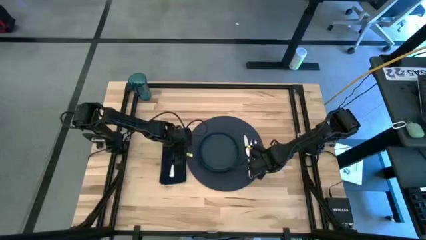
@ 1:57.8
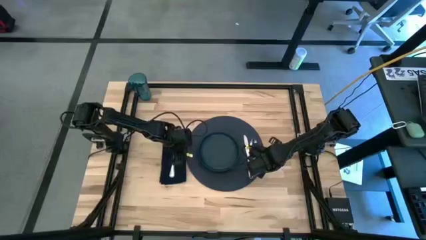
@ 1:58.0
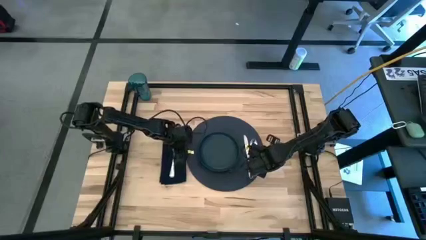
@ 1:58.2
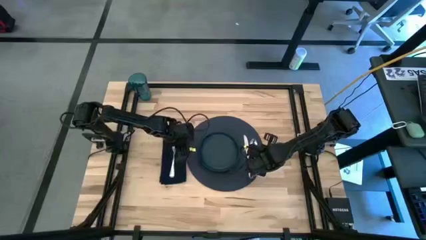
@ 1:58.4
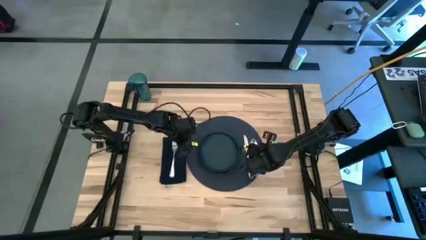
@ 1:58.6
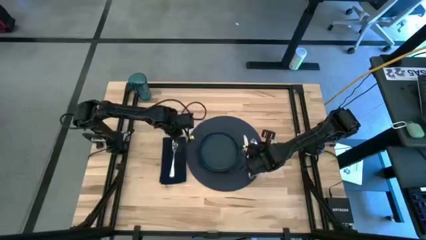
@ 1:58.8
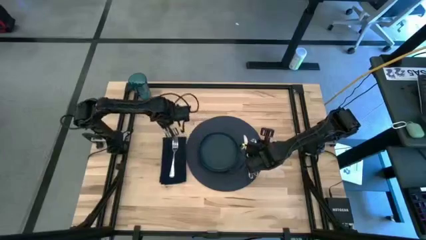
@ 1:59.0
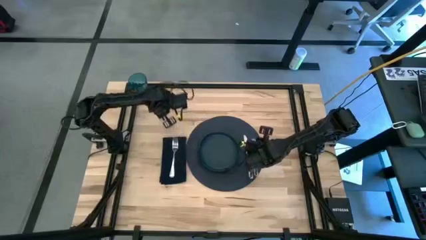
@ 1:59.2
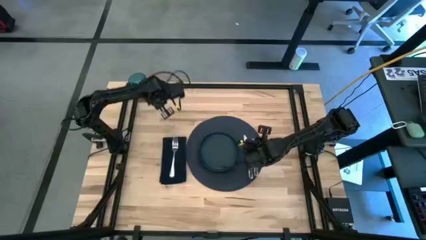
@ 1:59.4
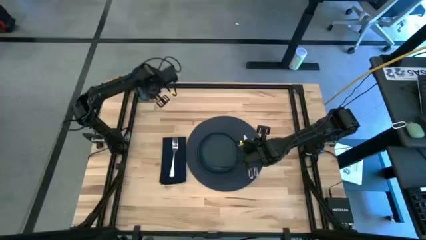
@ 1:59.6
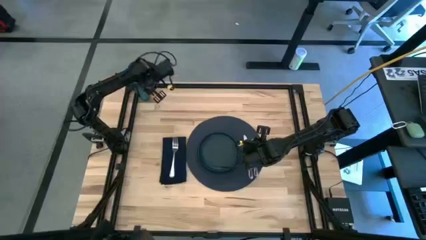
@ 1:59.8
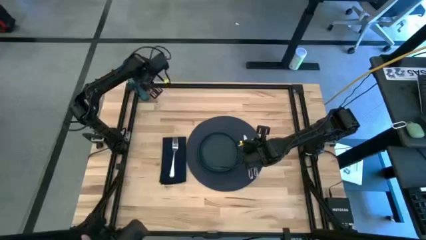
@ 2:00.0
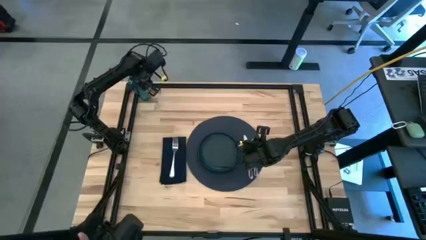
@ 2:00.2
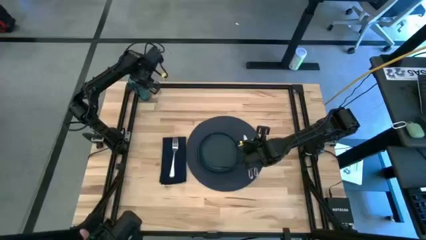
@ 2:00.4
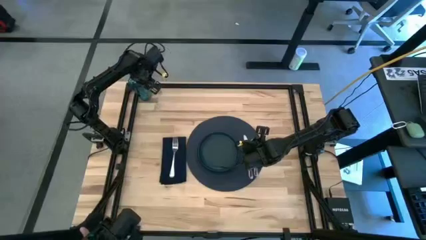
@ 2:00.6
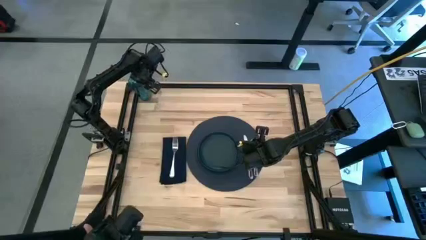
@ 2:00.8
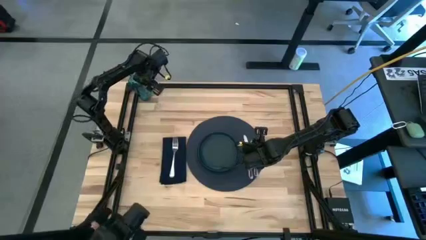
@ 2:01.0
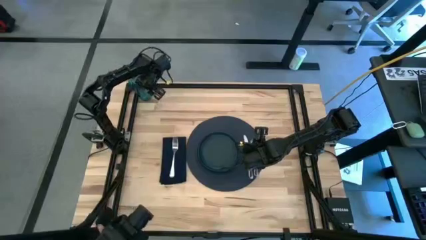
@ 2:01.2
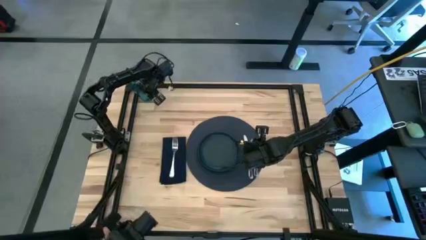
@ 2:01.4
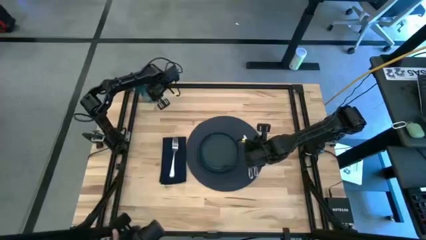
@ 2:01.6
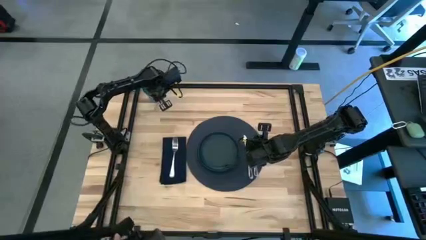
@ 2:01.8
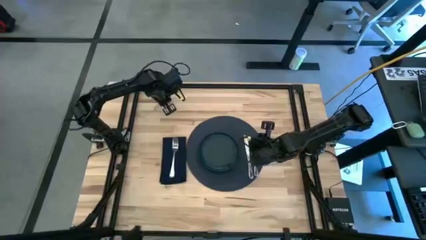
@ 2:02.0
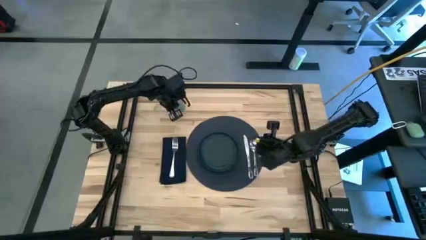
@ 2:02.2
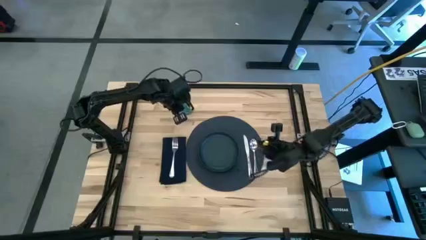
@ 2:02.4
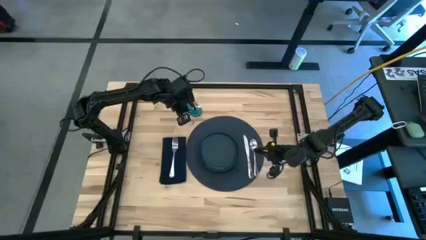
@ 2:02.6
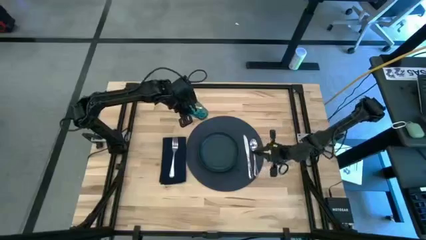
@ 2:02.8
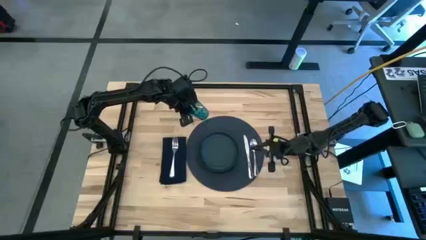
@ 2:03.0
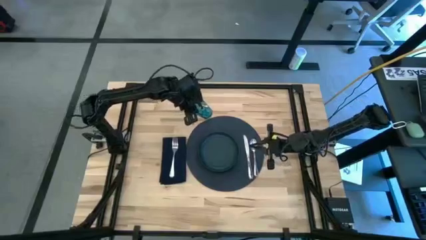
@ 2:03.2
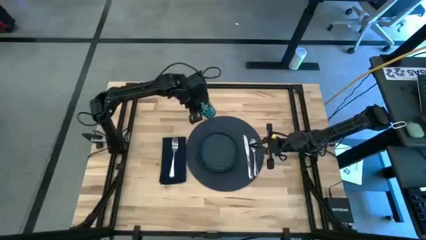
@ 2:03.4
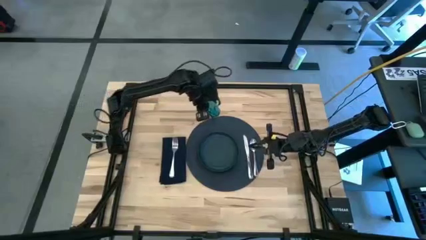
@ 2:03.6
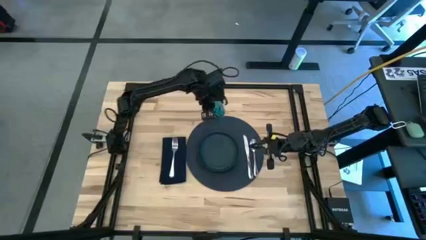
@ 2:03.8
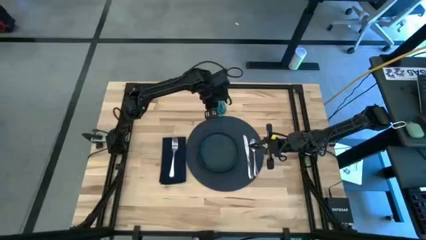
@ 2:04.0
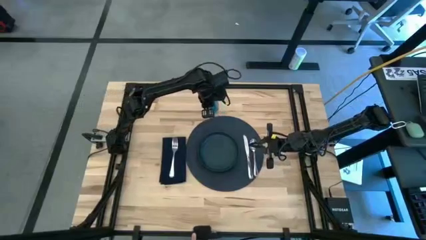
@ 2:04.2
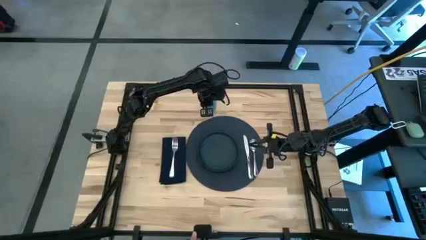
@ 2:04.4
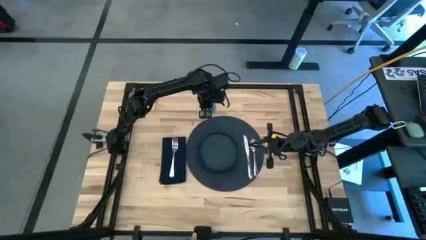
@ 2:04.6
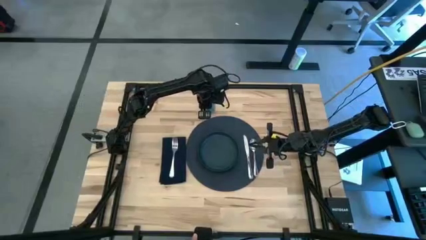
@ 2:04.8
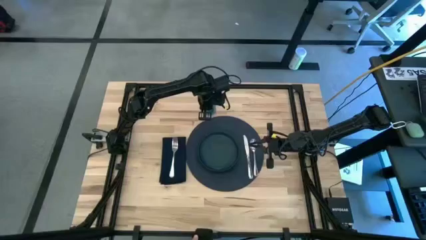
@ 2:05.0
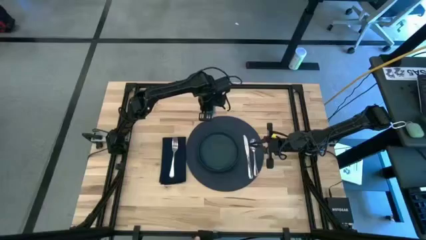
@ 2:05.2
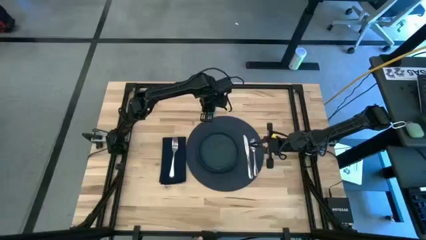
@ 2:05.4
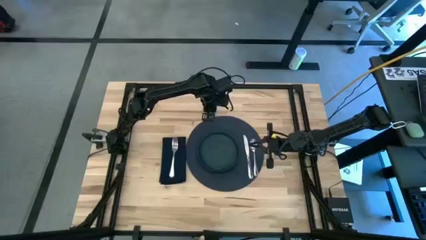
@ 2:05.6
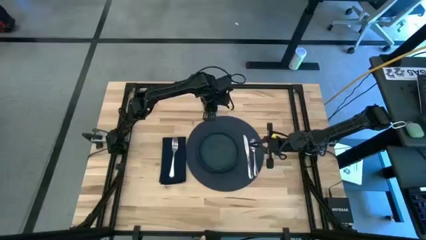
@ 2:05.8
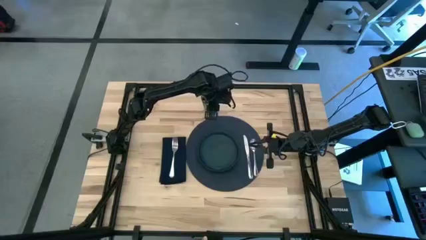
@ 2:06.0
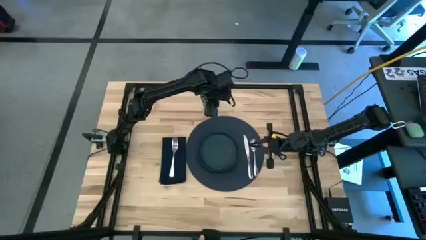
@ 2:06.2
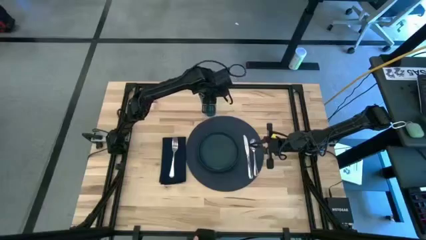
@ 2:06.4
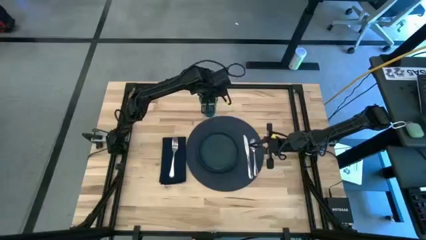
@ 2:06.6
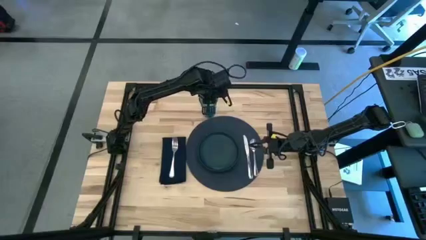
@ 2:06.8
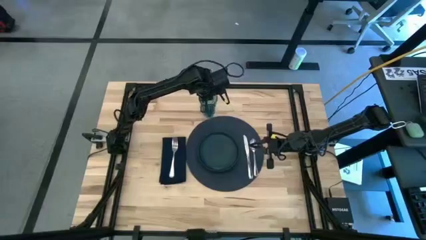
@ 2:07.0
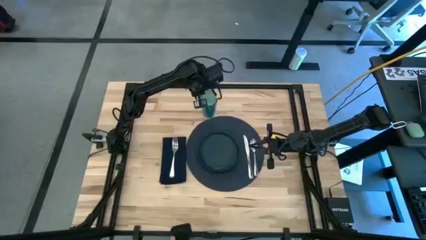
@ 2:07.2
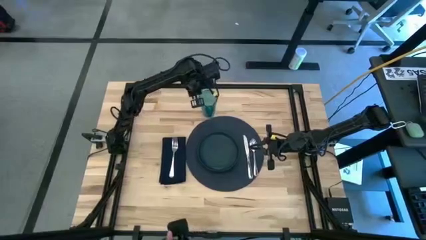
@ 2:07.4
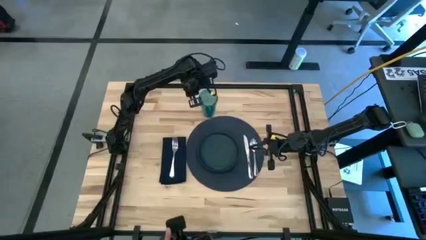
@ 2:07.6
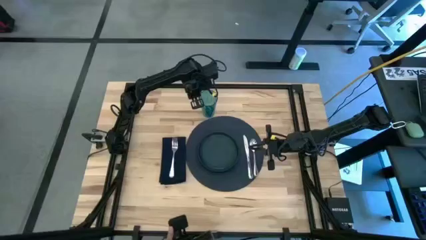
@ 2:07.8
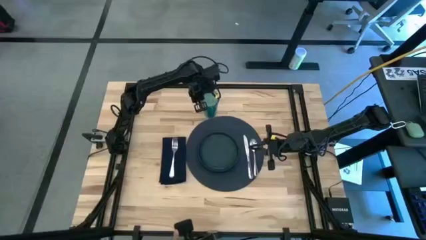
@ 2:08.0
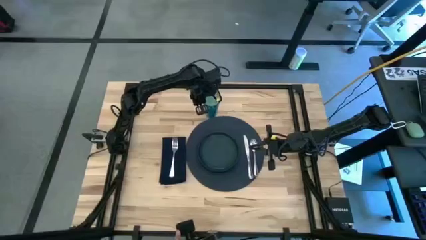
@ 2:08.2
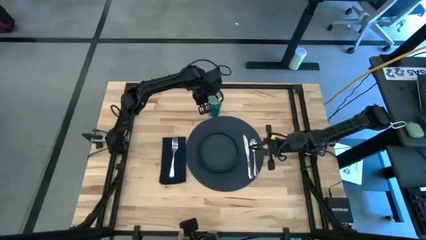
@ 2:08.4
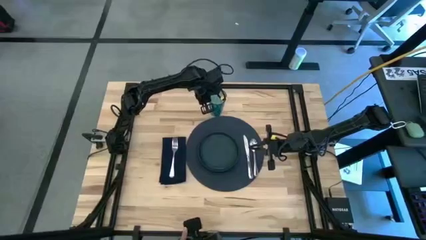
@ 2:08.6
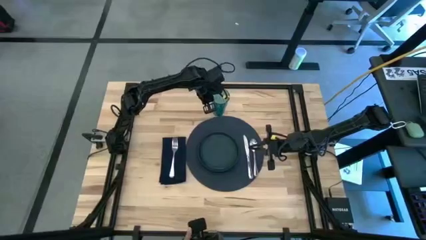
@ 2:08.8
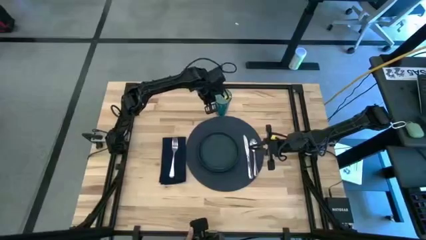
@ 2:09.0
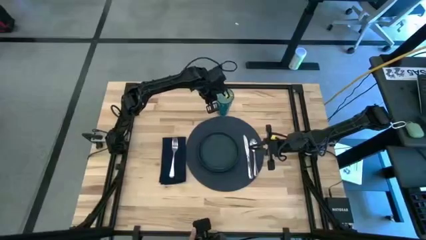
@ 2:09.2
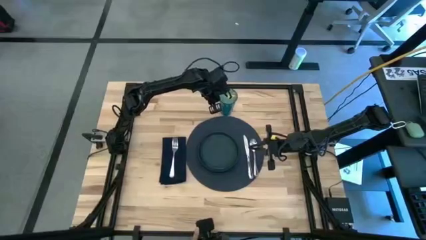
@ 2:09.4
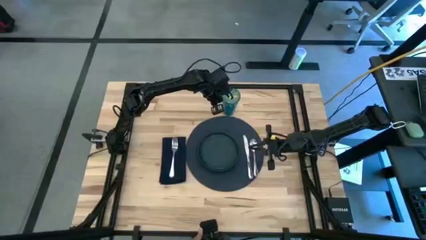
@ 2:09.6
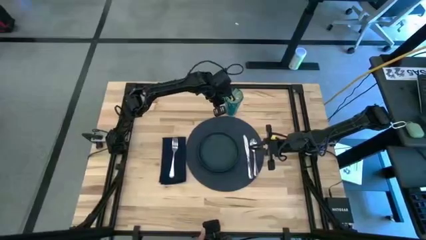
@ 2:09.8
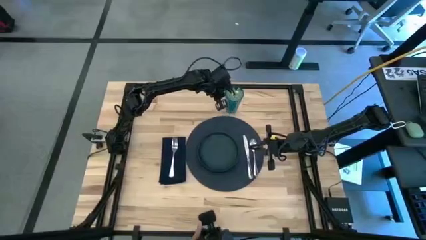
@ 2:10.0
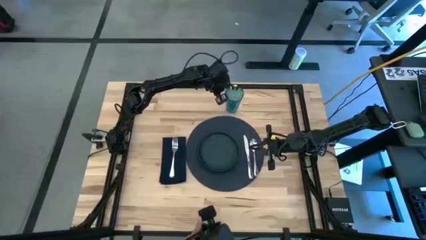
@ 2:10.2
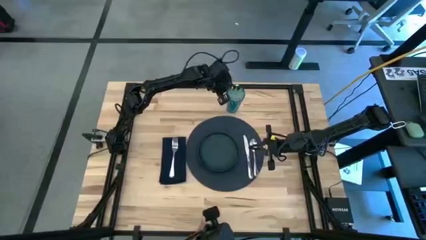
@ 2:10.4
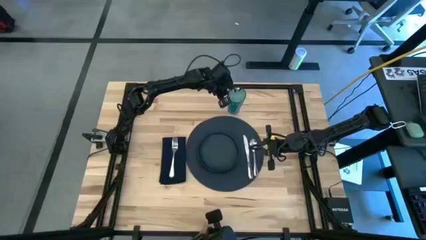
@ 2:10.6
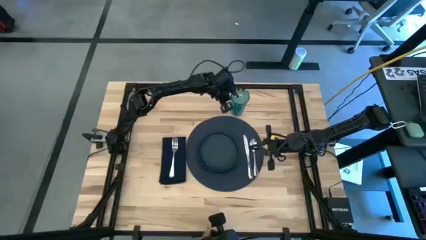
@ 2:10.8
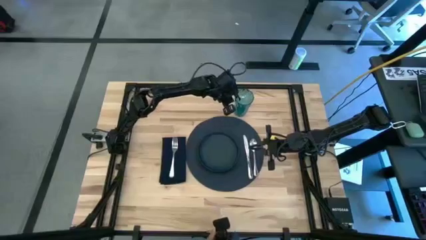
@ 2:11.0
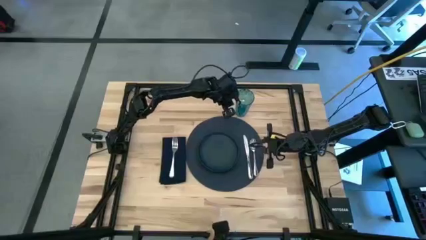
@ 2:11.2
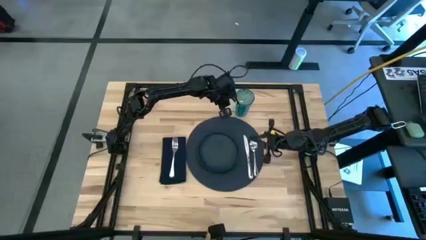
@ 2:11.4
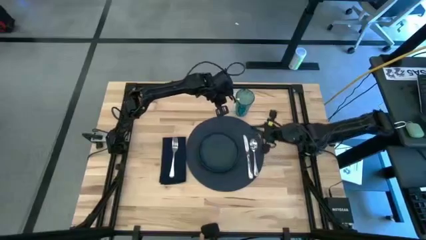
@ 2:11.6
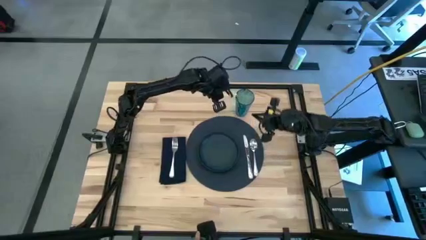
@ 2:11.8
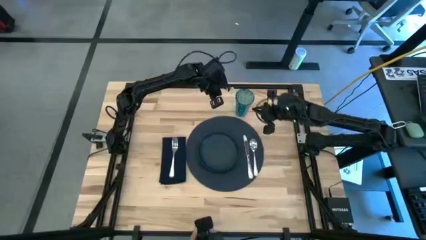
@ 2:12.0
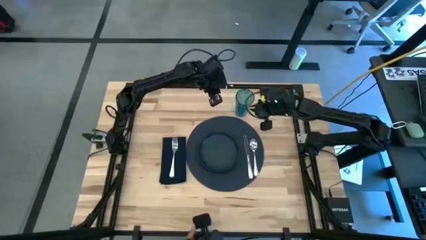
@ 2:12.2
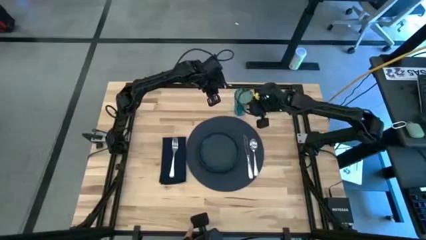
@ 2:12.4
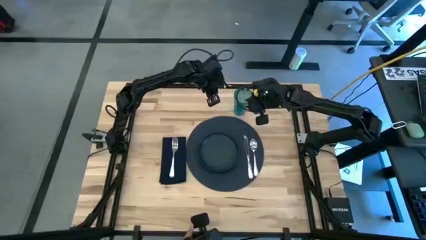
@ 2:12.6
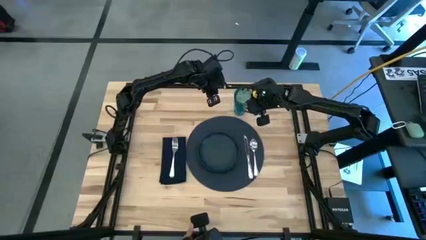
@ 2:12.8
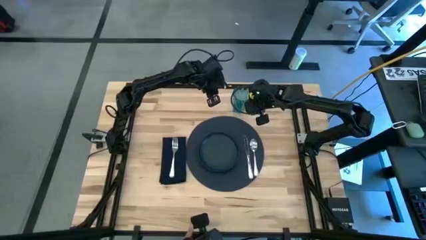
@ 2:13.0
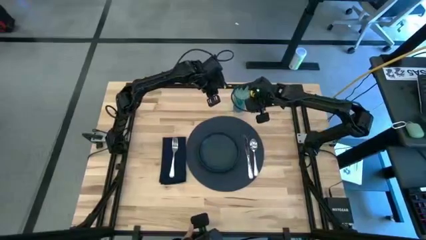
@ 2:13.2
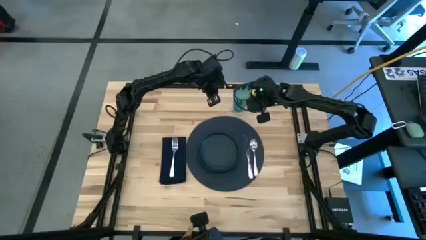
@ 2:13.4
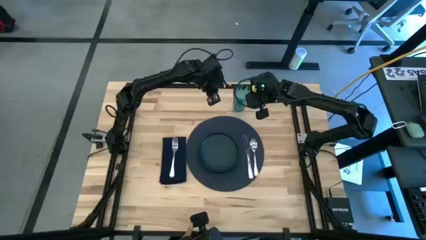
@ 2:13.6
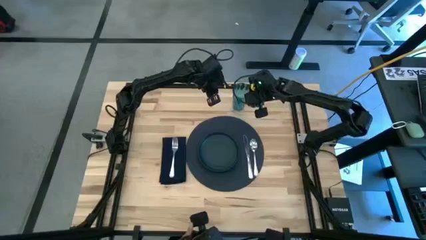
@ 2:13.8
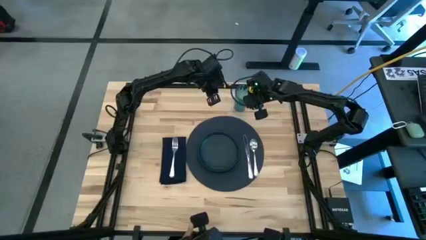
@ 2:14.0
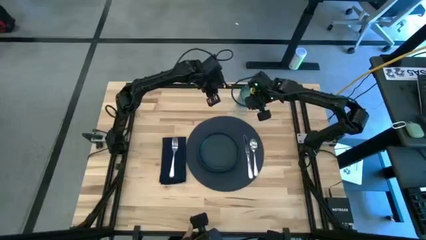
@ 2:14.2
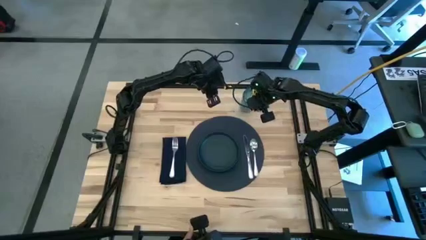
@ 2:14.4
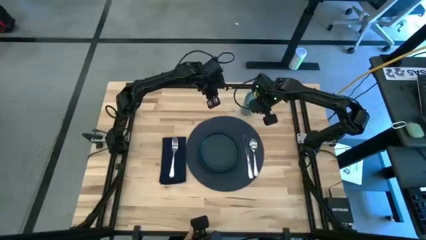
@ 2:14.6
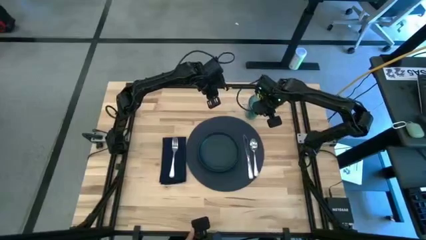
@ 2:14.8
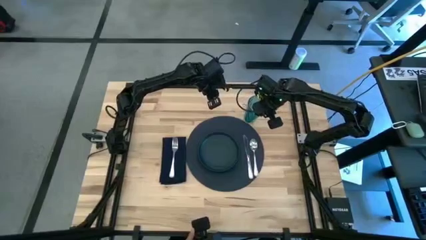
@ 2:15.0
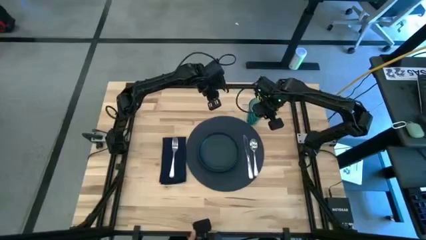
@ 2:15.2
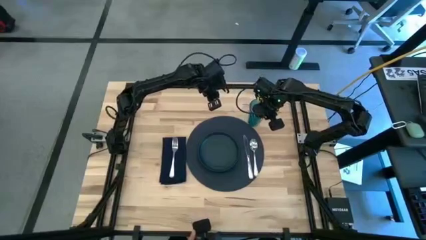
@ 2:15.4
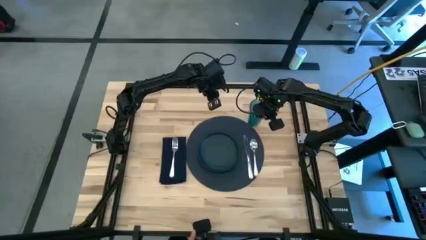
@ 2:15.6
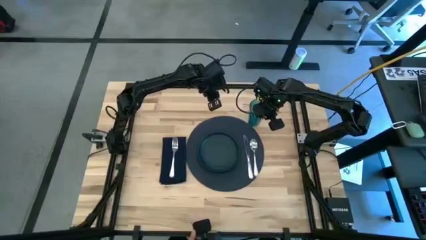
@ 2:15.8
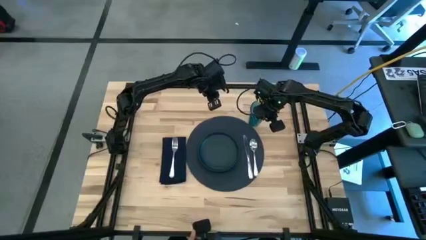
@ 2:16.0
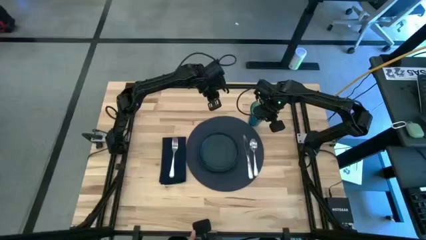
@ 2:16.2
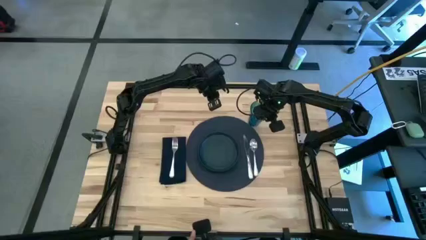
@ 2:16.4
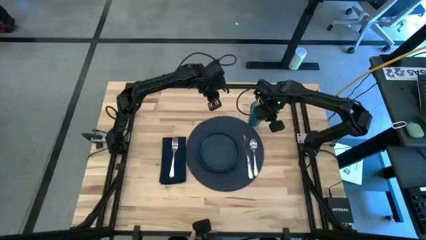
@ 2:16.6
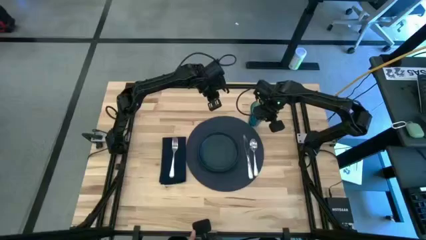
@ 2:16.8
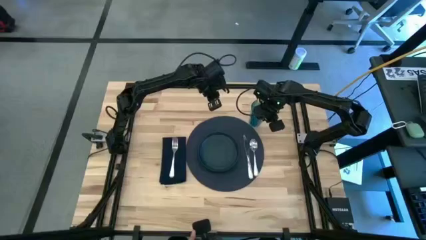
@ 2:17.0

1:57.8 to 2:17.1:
Task: Set table place
Put the blue cup to the top right of the black tablemat
